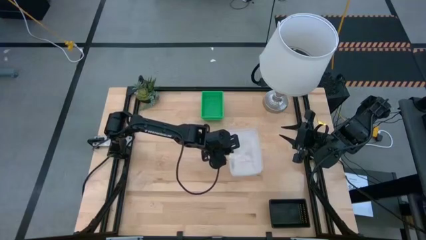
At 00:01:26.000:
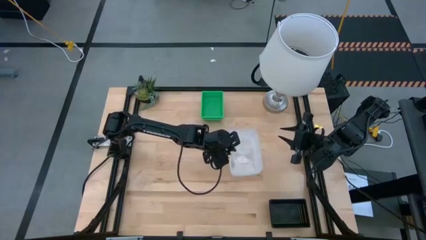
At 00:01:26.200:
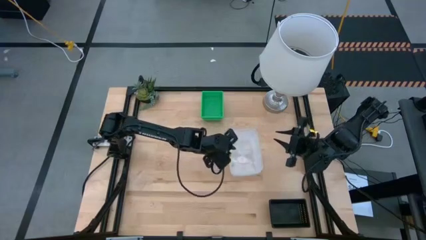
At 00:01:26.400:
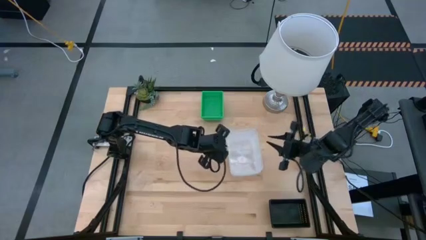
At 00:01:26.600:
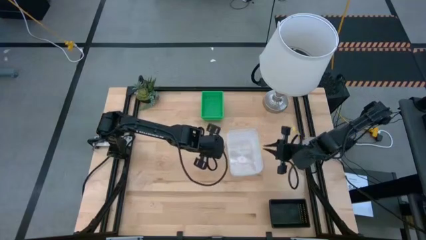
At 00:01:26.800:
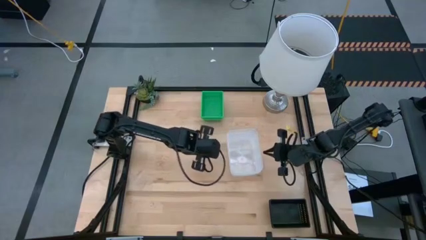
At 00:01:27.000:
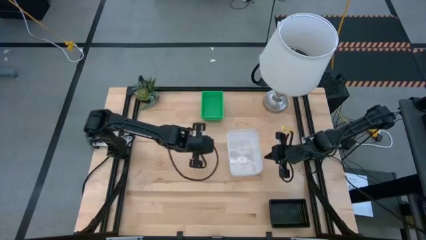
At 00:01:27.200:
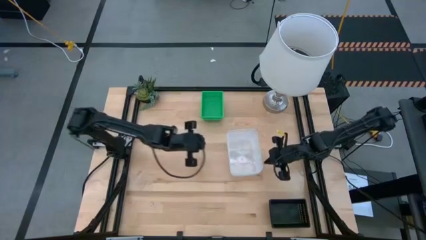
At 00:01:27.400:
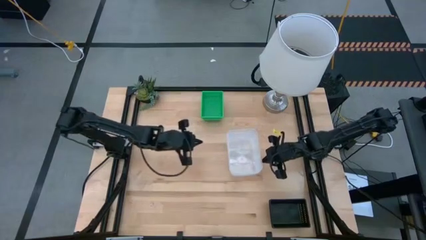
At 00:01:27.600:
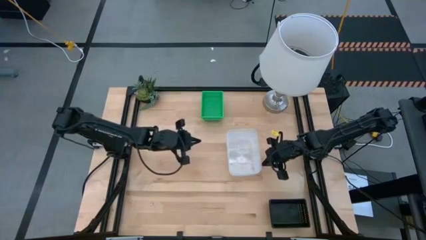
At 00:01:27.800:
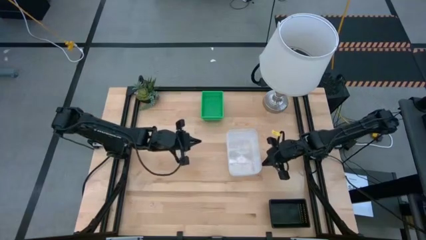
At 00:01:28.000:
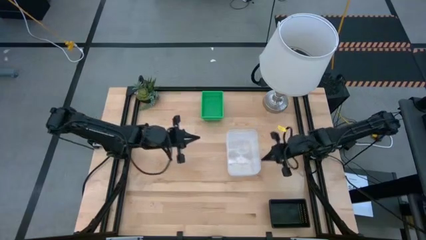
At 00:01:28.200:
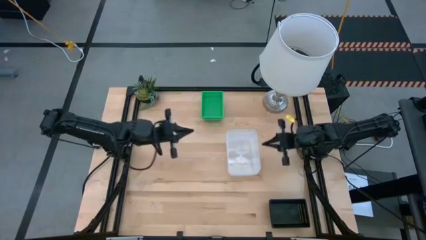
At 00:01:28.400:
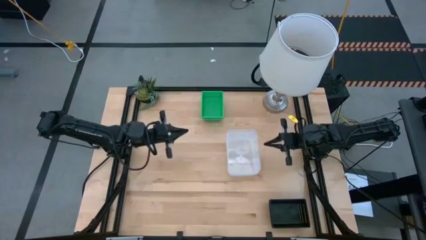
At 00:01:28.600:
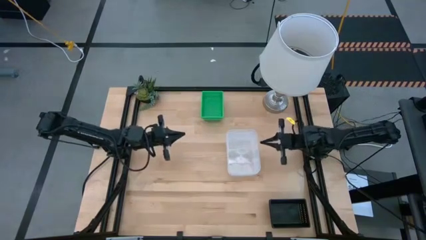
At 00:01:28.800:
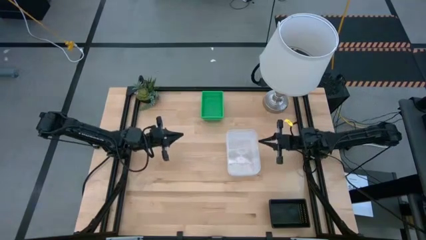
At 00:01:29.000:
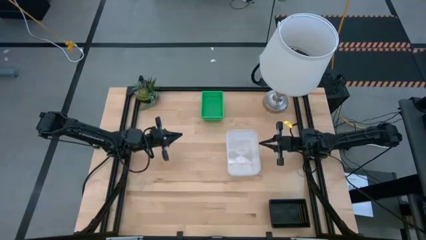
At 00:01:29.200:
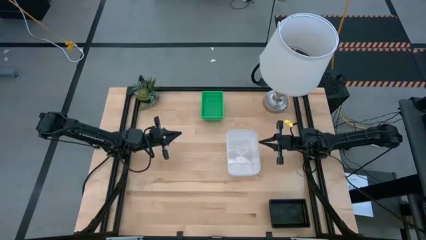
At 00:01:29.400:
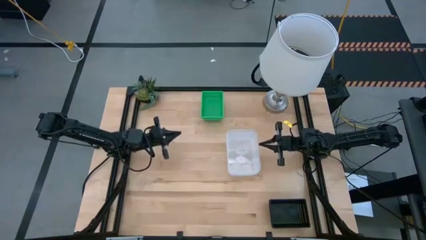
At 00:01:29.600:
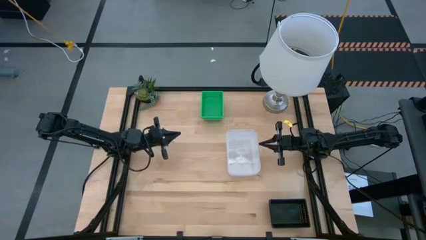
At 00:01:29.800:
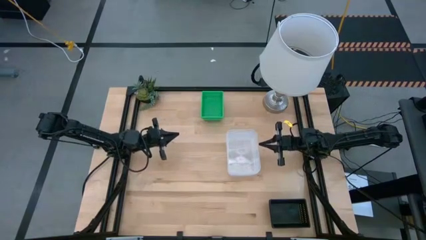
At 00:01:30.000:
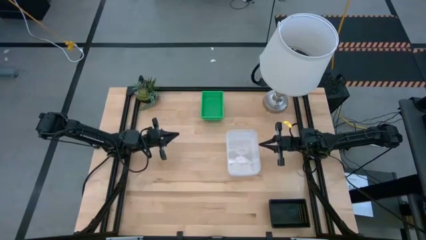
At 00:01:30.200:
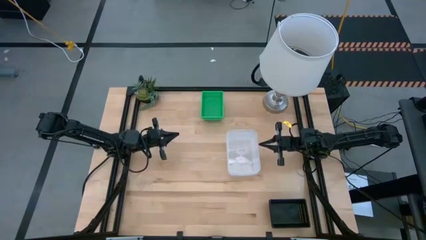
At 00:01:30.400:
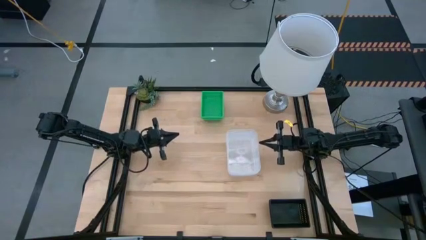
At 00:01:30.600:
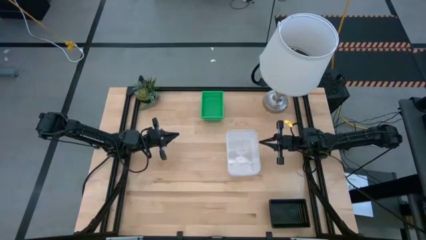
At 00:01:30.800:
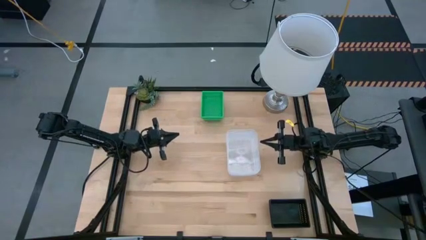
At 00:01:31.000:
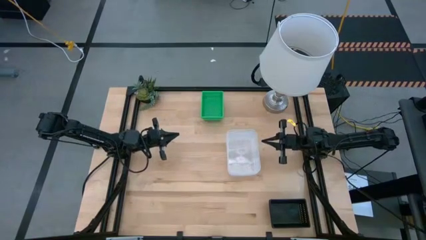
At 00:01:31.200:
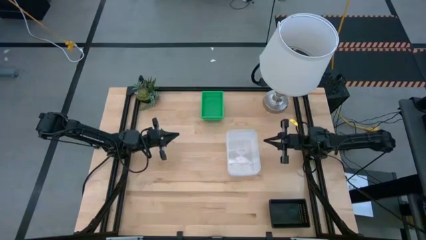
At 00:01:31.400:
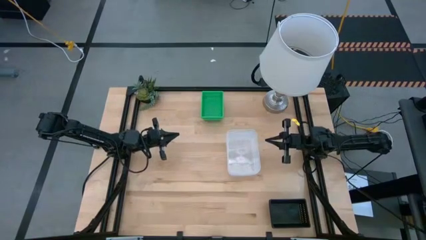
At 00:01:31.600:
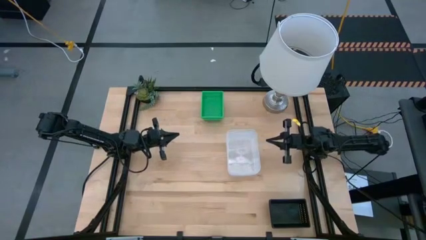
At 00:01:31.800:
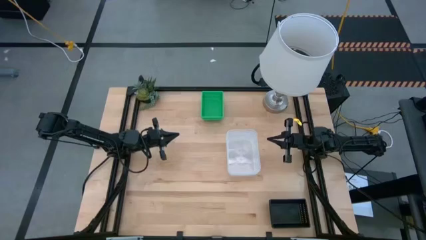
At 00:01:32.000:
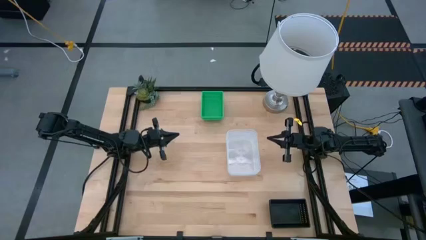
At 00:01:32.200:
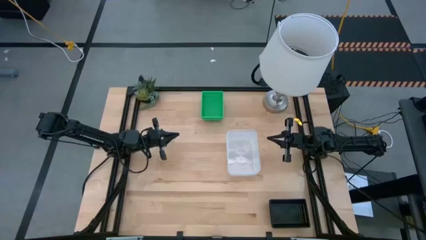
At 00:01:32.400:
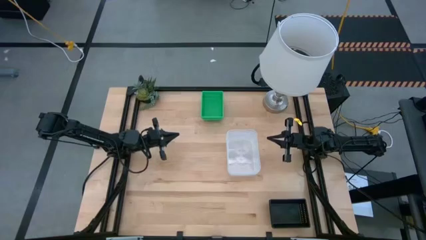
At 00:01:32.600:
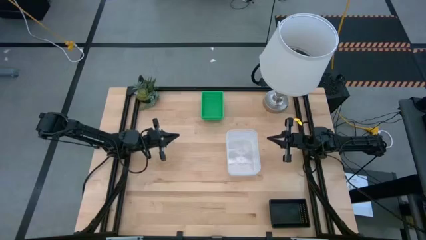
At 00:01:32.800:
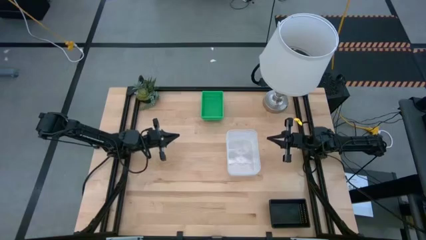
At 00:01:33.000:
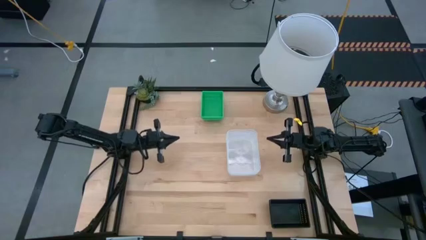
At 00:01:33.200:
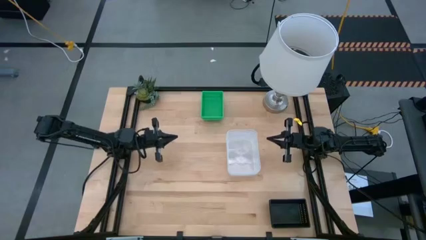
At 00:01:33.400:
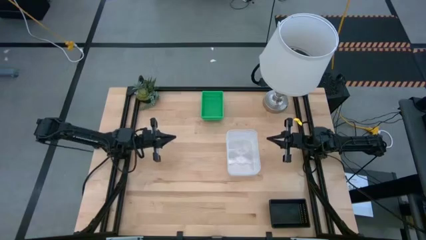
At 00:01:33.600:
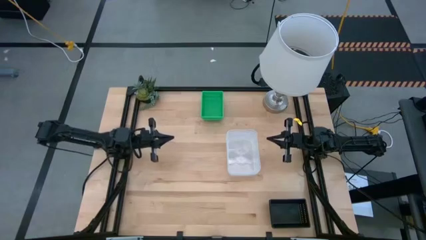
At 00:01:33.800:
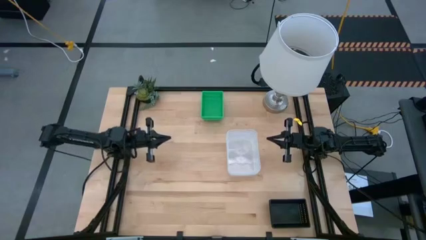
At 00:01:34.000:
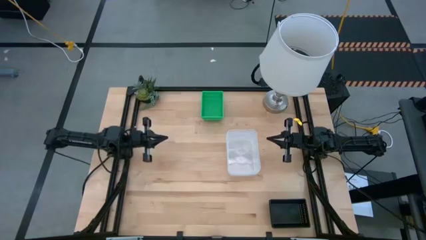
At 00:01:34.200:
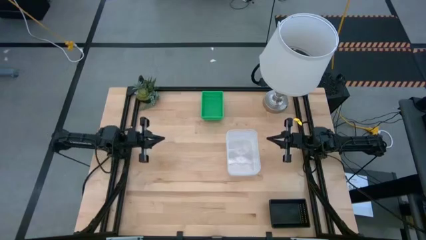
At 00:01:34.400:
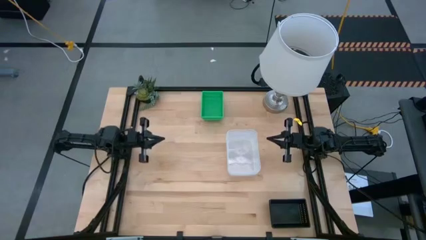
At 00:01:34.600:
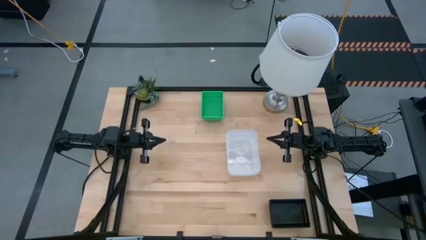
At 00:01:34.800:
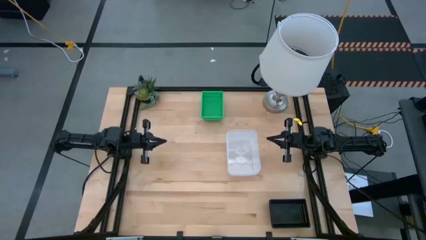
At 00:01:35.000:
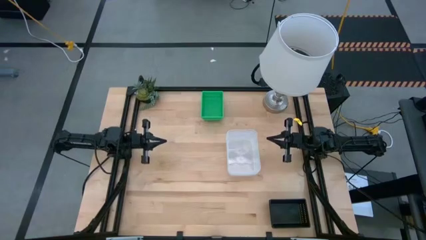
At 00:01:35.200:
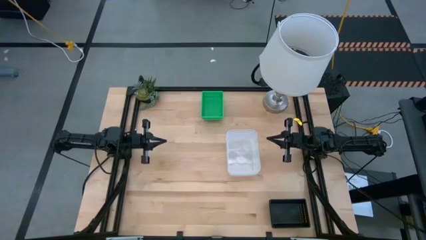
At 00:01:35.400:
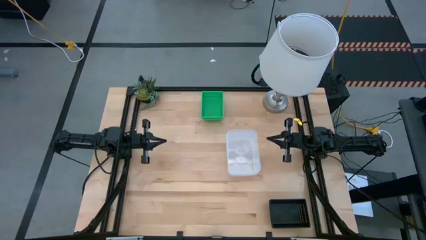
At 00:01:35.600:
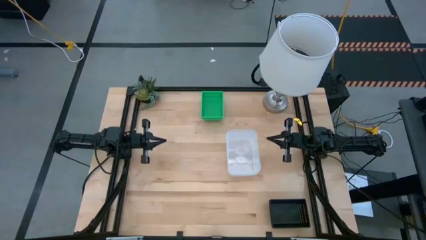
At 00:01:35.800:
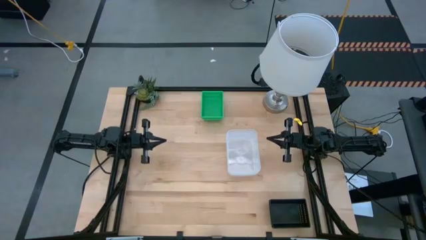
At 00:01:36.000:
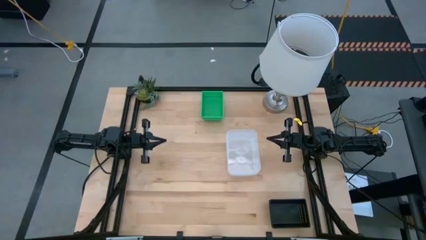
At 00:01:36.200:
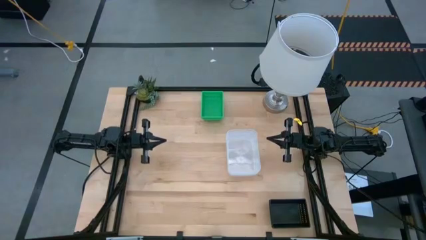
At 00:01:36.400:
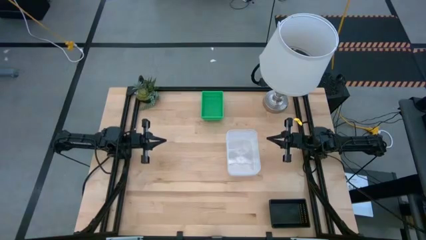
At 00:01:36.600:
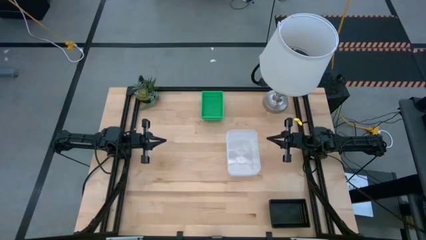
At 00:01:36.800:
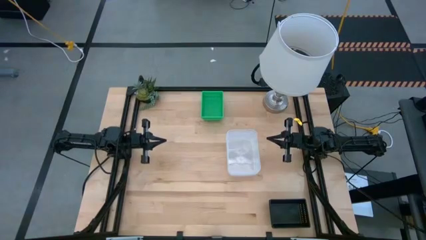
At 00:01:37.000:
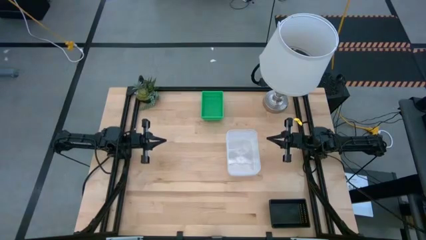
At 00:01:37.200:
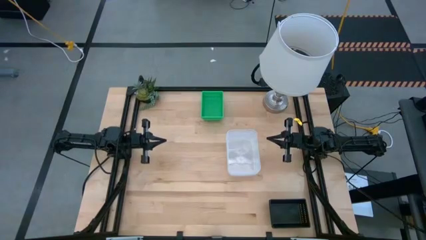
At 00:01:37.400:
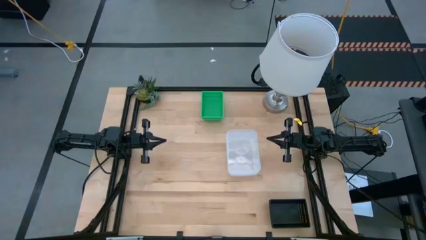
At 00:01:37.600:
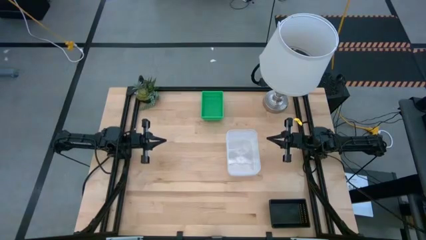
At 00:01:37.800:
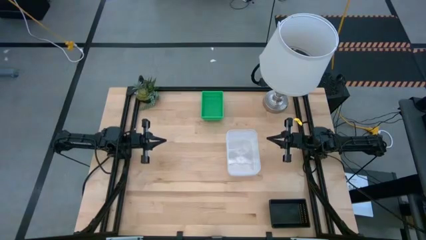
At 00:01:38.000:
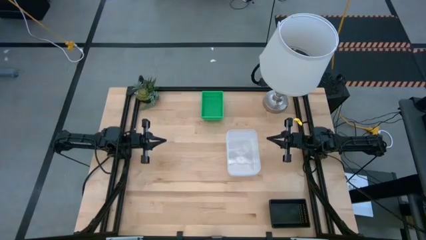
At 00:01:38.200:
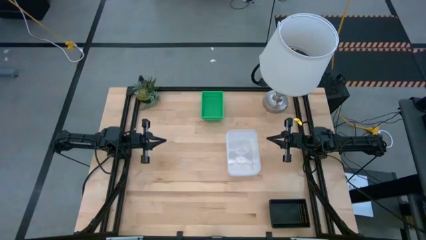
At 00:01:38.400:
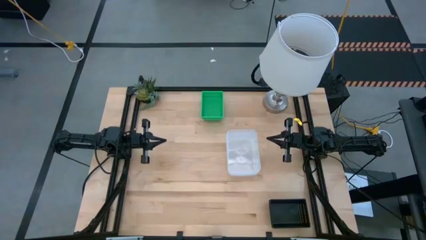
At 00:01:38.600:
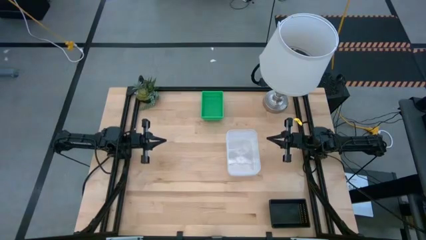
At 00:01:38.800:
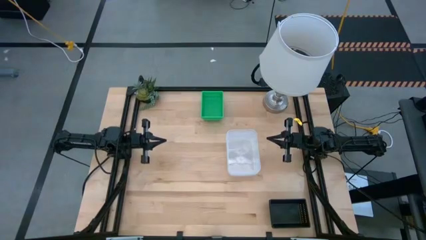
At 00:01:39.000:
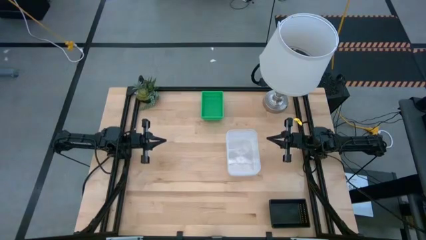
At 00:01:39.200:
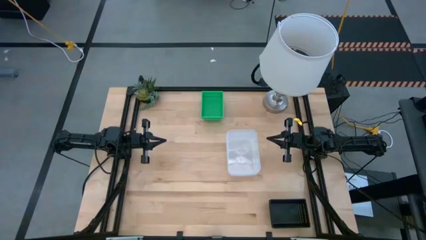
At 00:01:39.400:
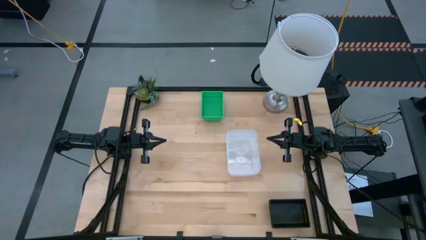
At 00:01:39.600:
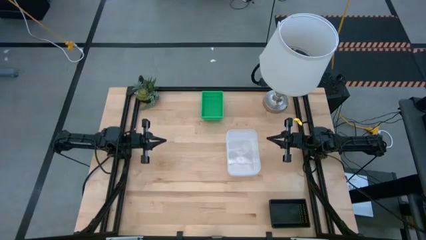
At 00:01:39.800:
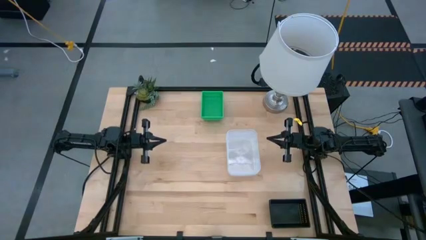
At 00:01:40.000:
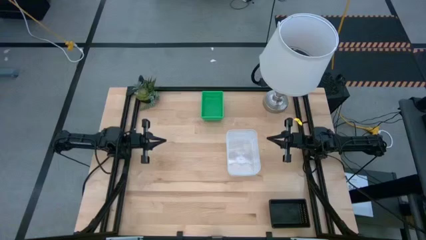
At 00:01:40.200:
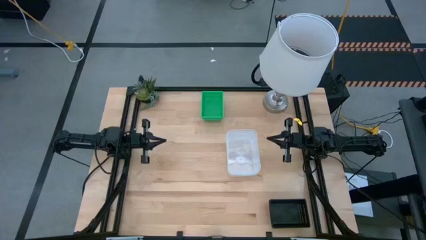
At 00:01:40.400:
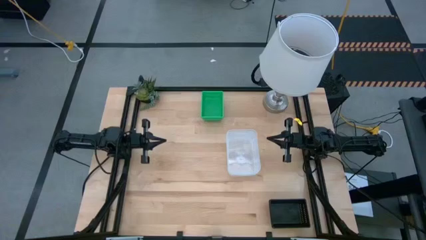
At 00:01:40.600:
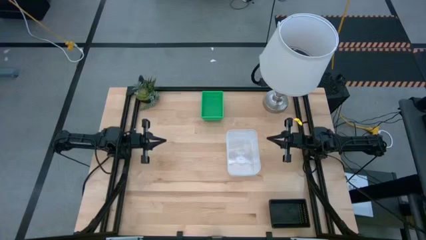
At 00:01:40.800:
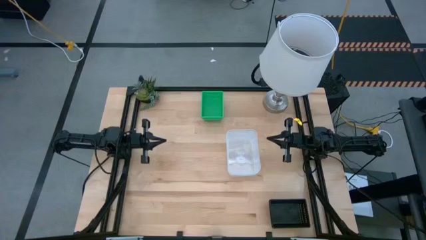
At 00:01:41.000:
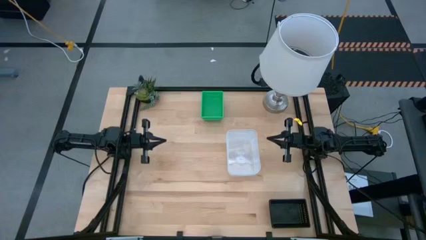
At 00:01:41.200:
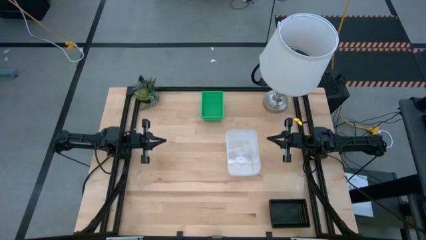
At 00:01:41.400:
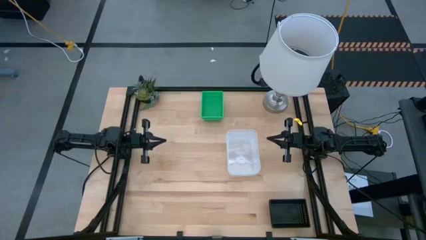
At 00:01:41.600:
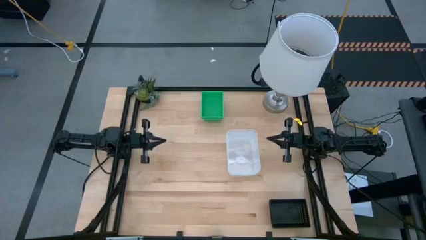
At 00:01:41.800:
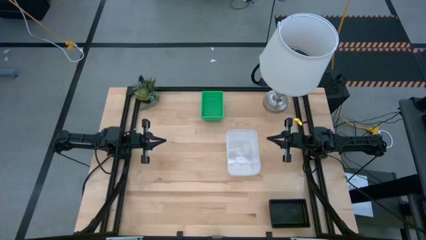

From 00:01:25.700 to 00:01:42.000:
Return to Home Position
